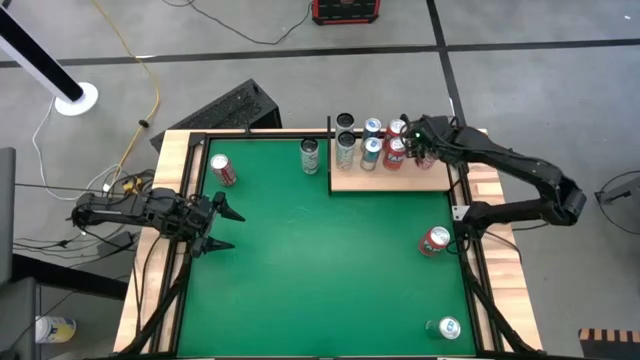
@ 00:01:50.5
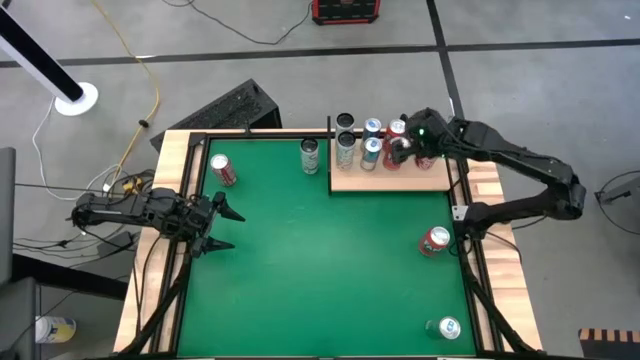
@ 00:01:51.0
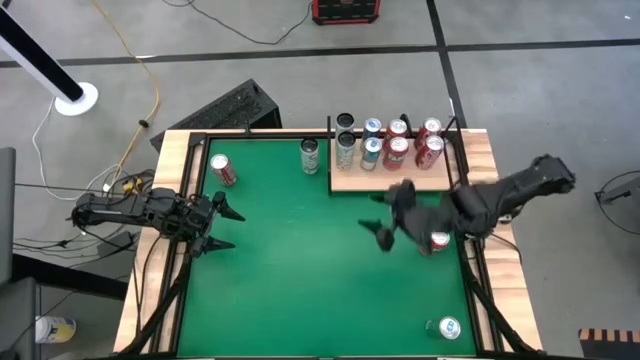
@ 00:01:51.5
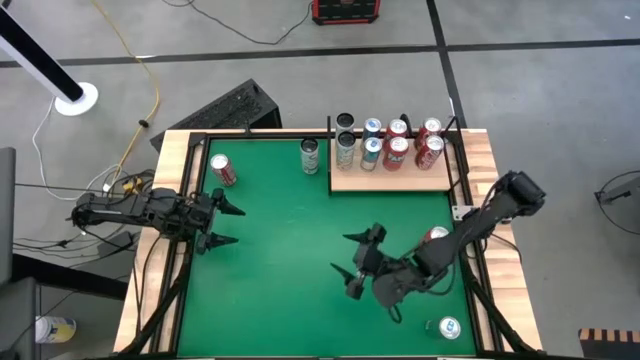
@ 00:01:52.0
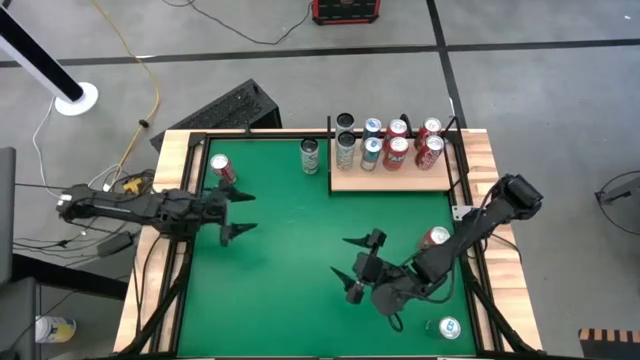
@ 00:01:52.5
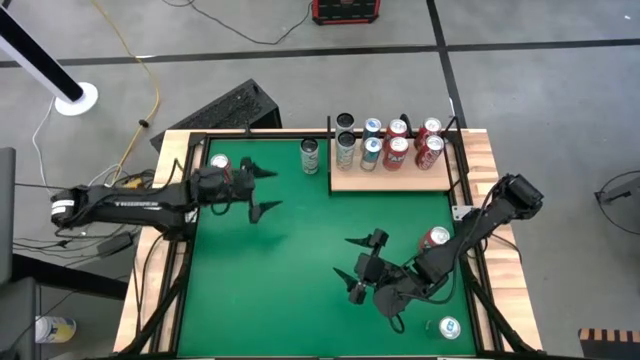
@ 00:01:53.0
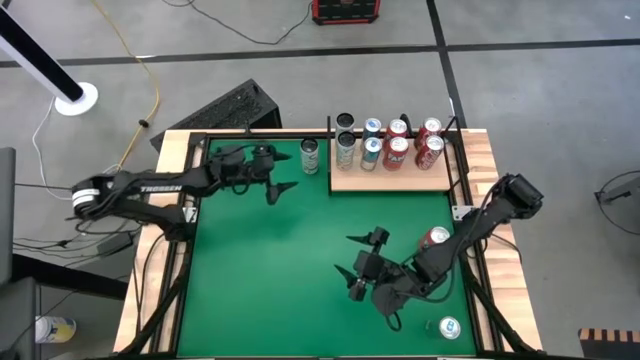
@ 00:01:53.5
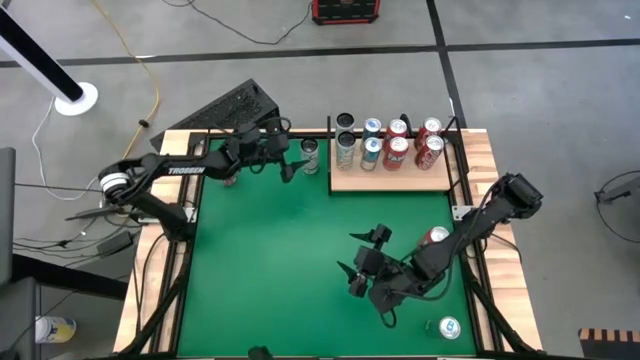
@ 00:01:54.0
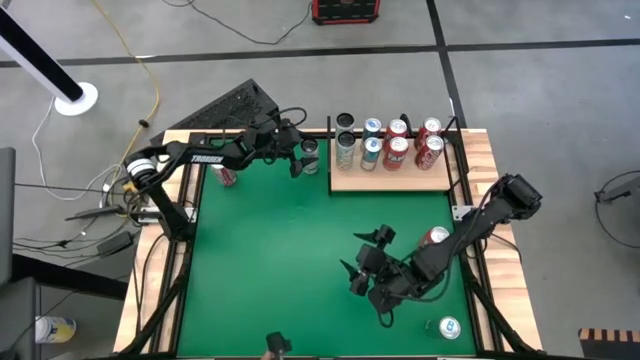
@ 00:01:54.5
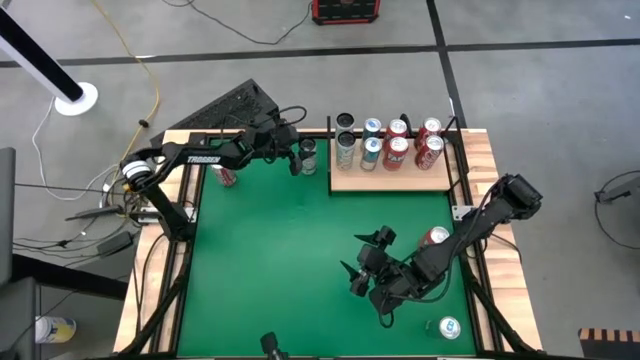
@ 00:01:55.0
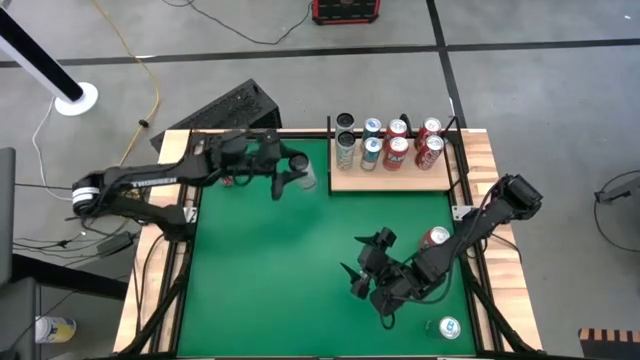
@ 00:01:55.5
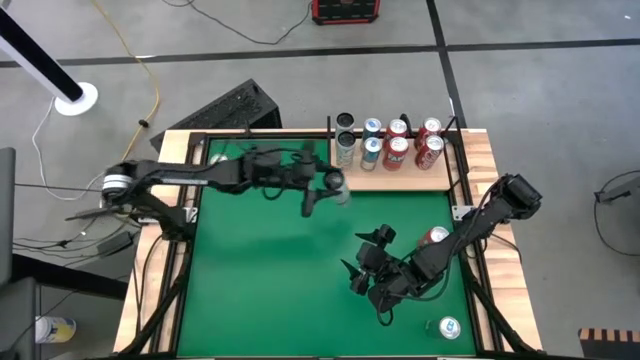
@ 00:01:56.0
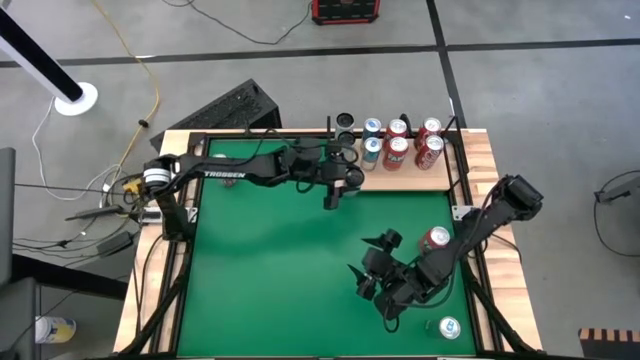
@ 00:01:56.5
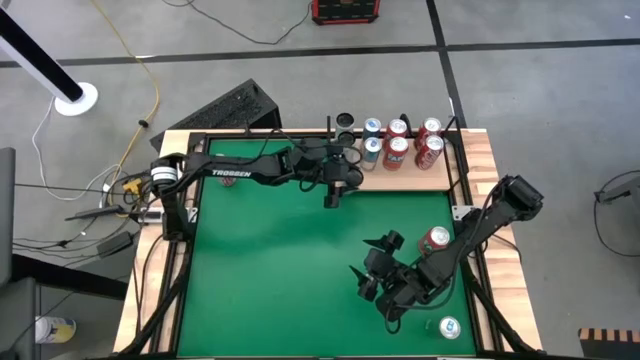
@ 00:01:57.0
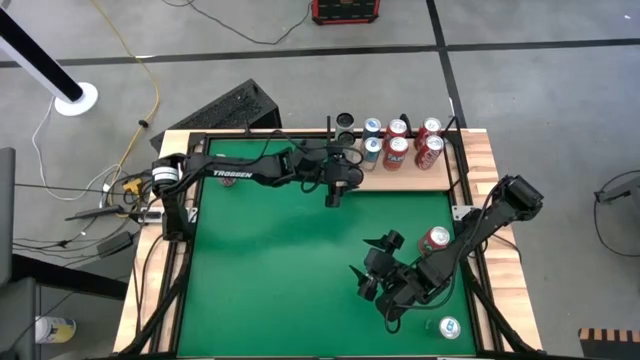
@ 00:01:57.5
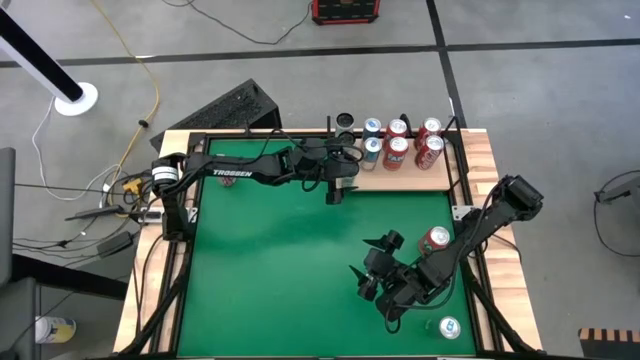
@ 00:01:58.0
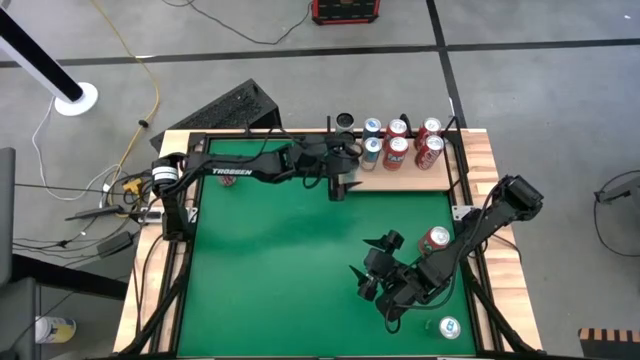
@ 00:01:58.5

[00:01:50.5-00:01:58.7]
Task: Sort soda cans
Put the white and blue soda can on the shelf align with the other white and blue soda cans

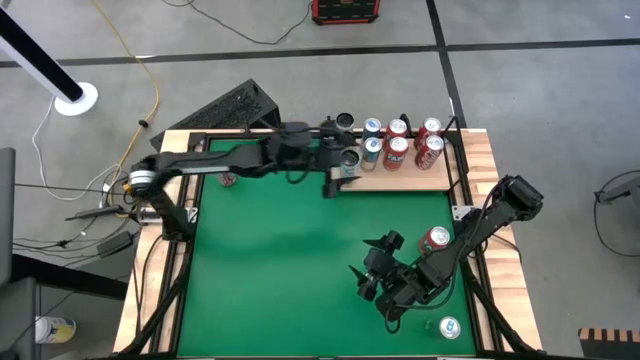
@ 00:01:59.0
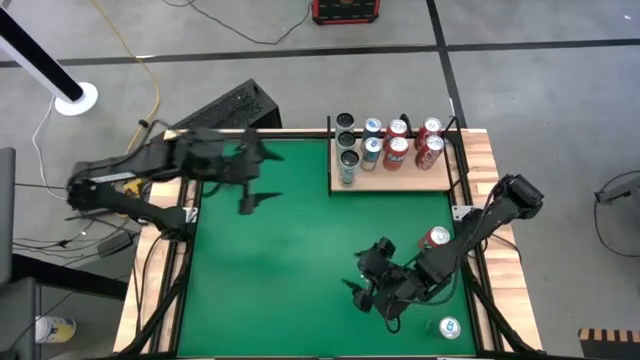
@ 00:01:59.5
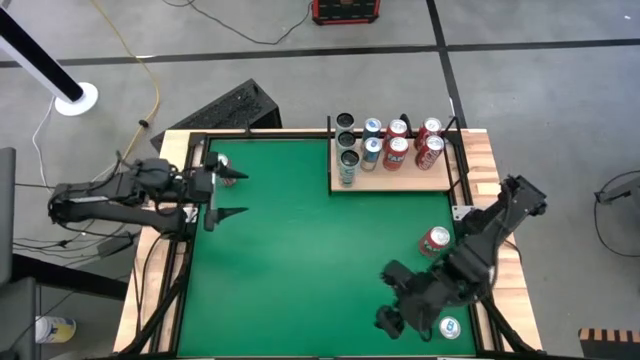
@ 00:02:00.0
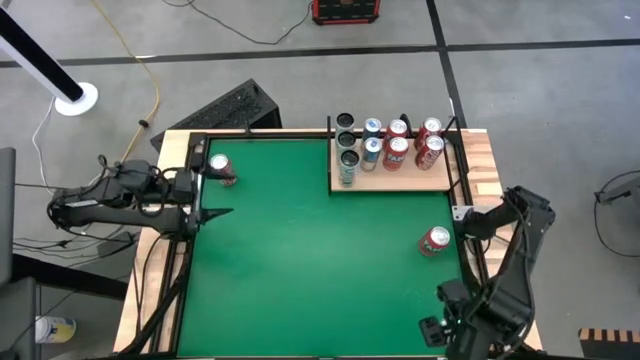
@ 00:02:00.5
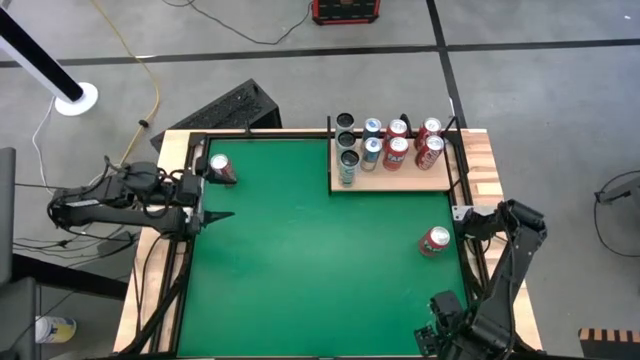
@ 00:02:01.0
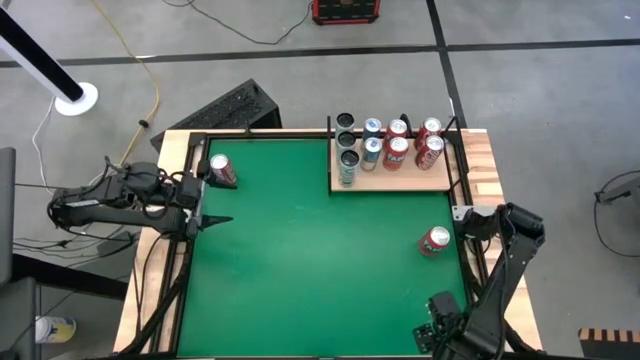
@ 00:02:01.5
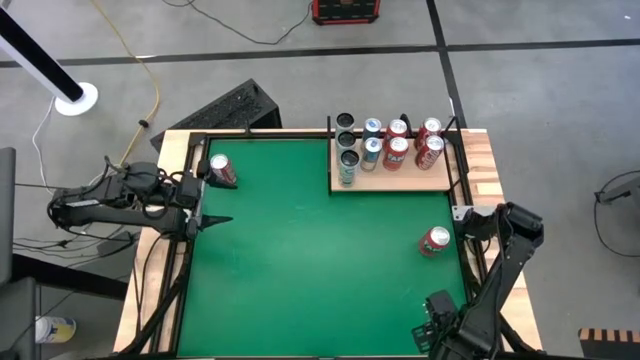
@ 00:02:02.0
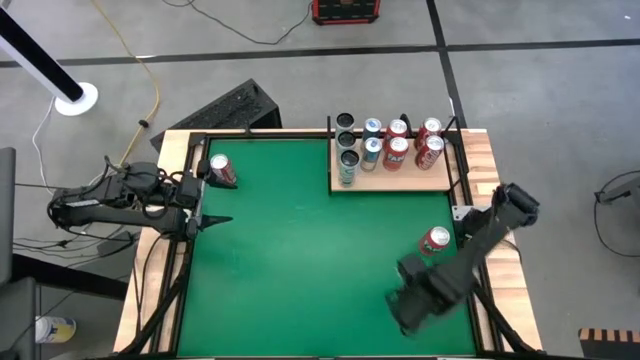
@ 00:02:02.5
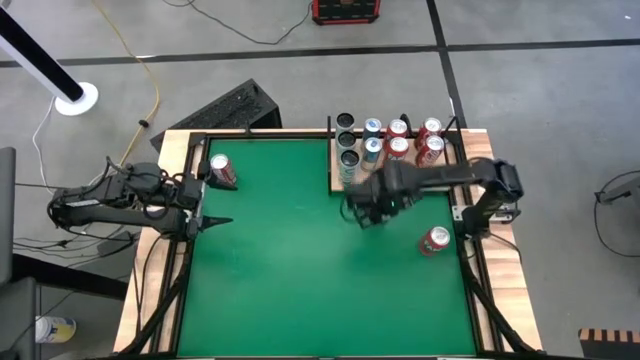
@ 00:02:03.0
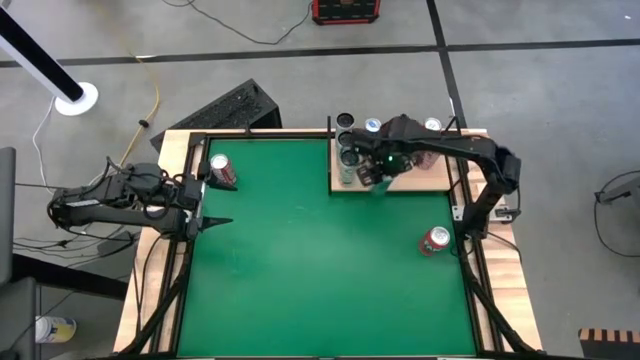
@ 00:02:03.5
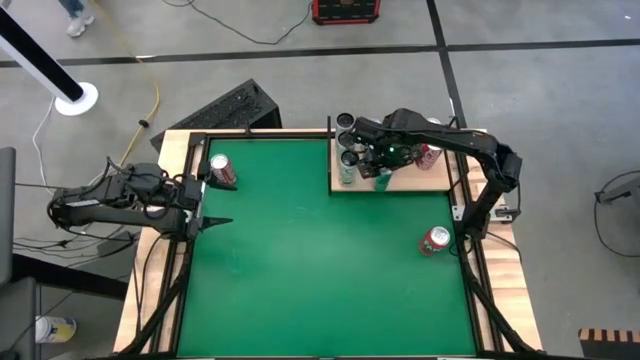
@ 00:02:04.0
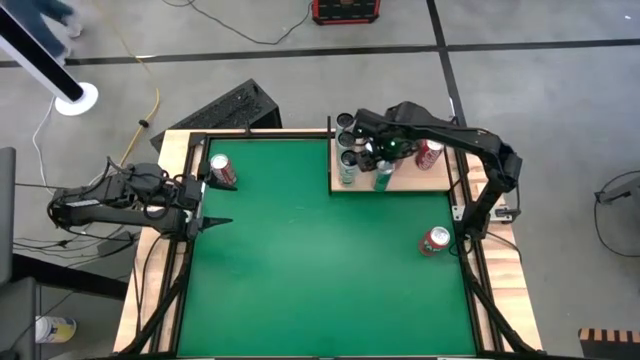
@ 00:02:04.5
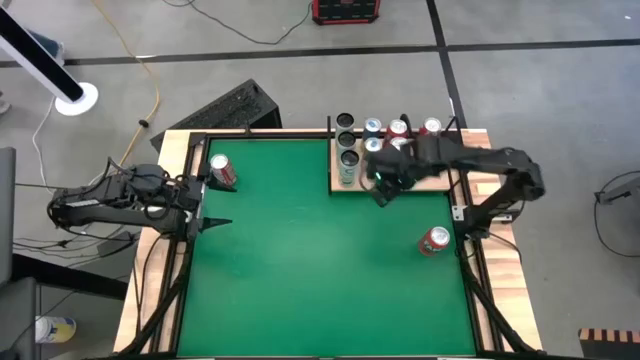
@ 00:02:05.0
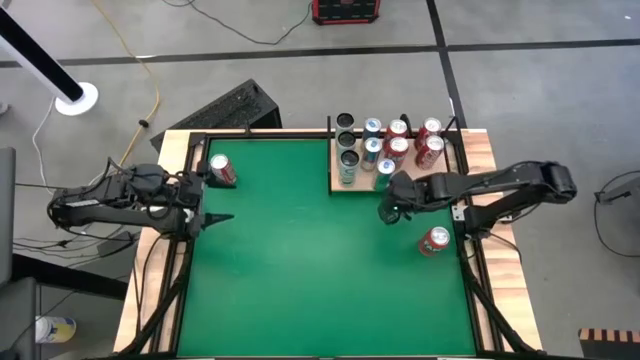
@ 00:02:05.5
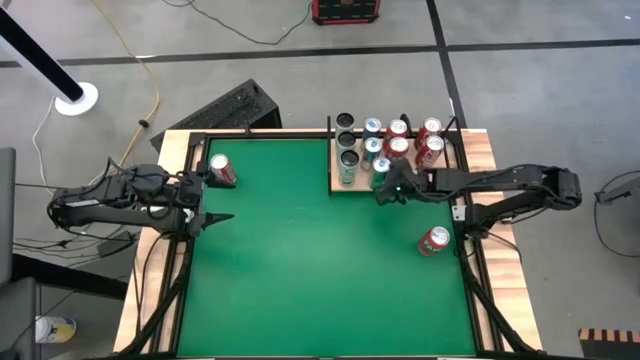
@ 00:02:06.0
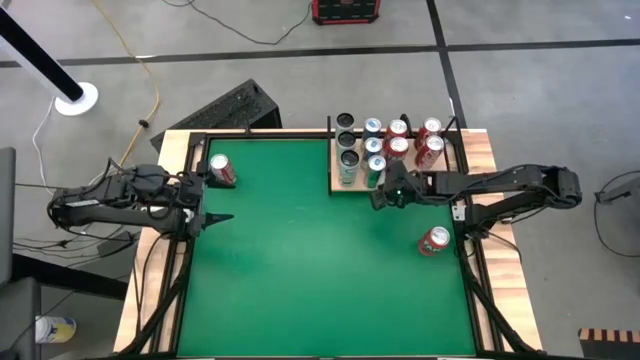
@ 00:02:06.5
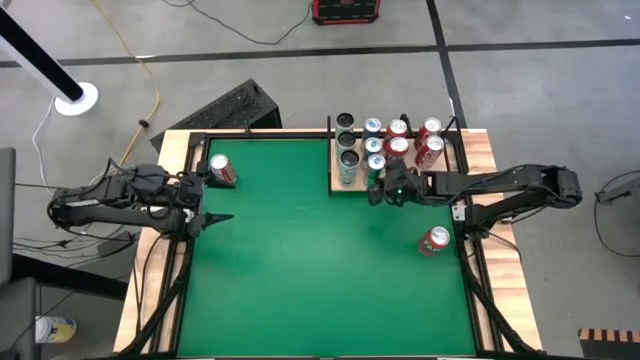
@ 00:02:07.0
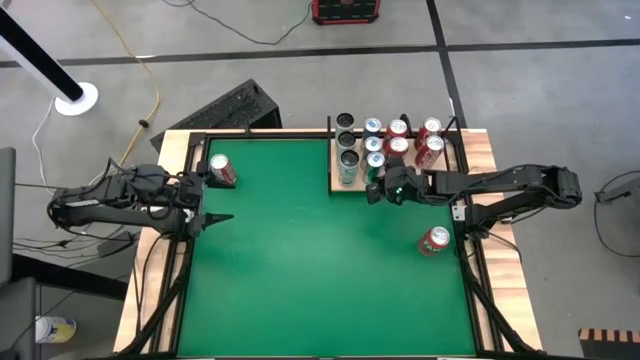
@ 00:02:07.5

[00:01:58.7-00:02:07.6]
Put the blue soda can on the shelf align with the other blue soda cans
